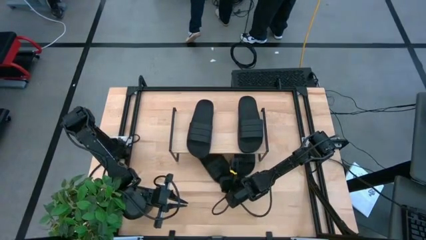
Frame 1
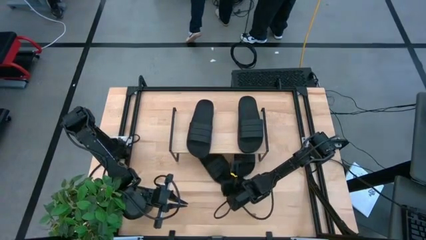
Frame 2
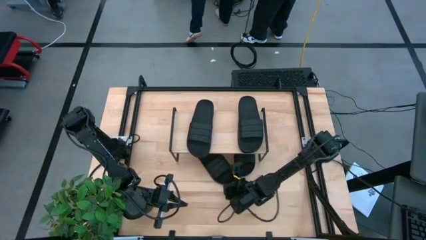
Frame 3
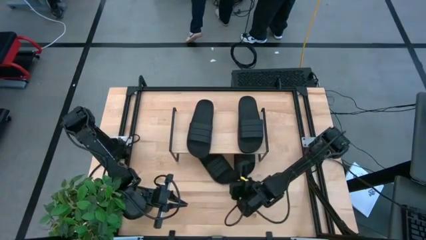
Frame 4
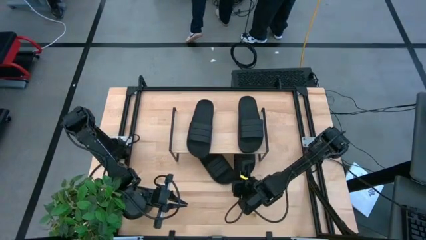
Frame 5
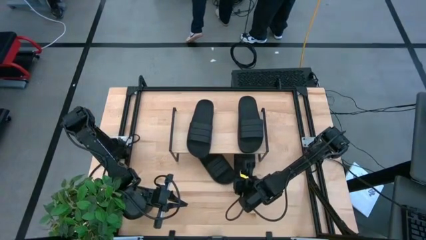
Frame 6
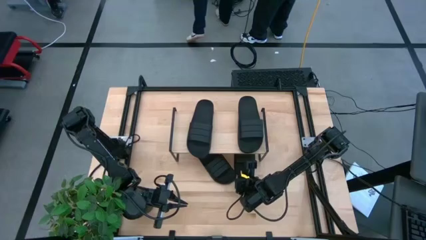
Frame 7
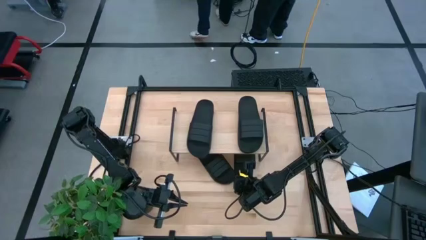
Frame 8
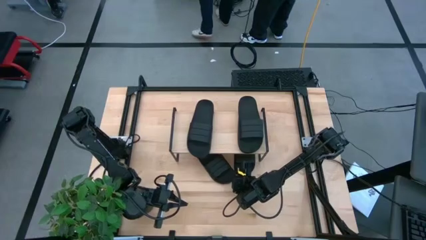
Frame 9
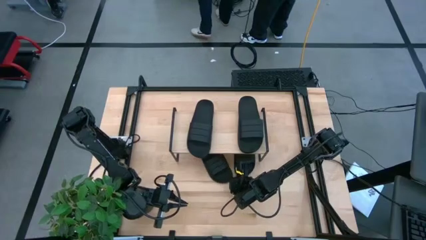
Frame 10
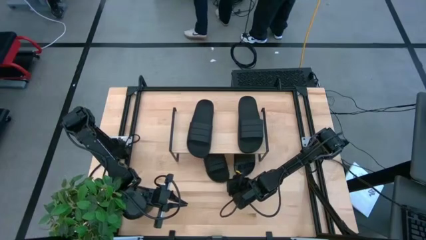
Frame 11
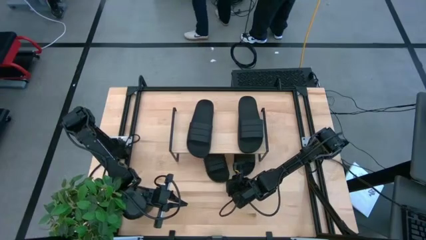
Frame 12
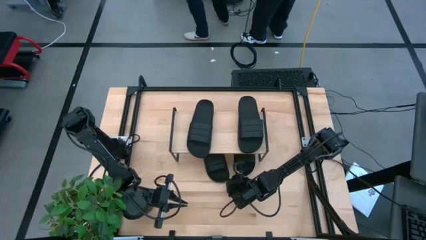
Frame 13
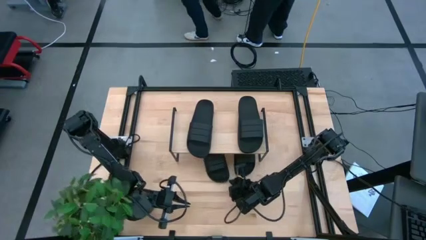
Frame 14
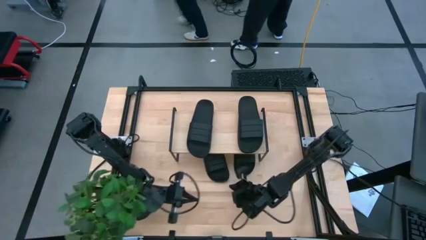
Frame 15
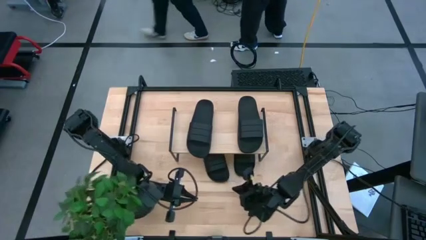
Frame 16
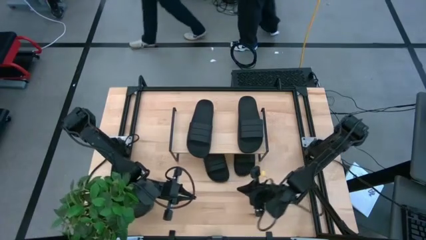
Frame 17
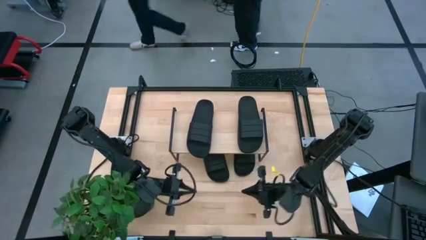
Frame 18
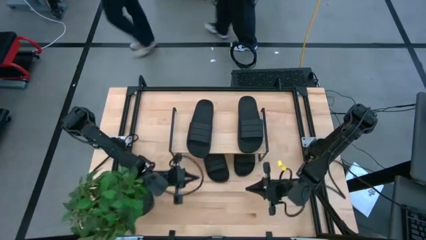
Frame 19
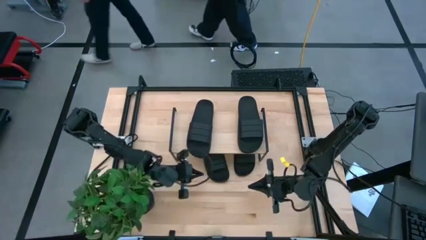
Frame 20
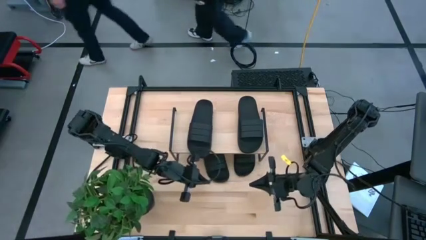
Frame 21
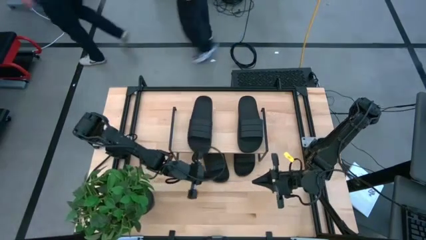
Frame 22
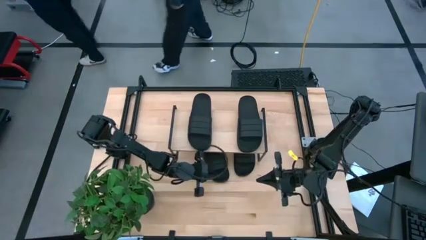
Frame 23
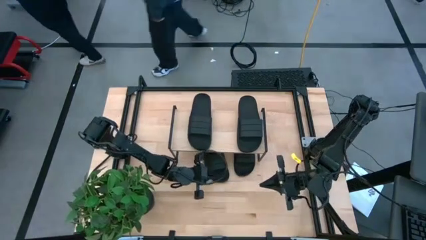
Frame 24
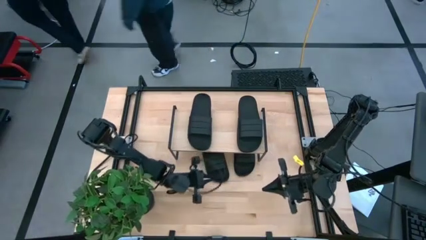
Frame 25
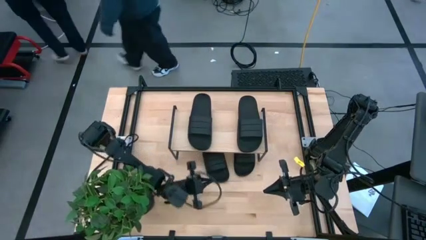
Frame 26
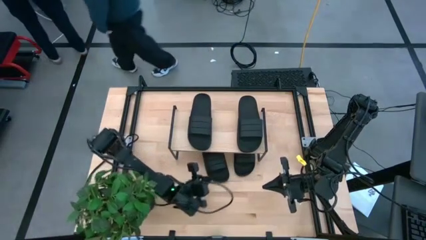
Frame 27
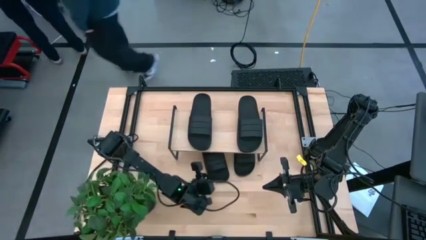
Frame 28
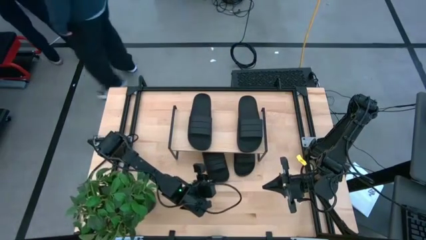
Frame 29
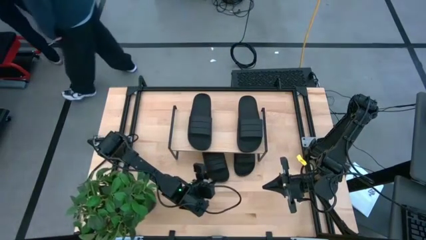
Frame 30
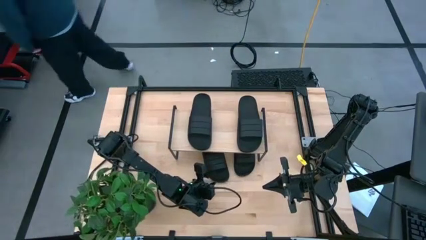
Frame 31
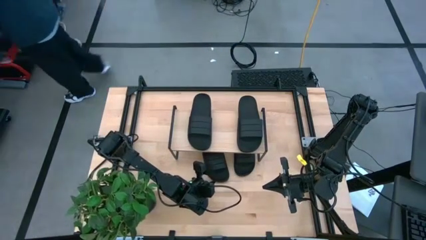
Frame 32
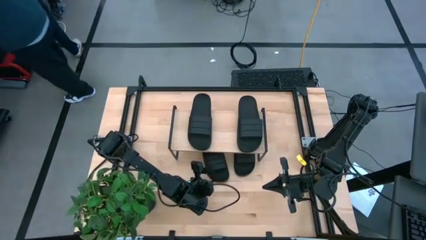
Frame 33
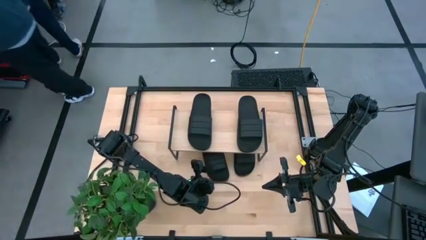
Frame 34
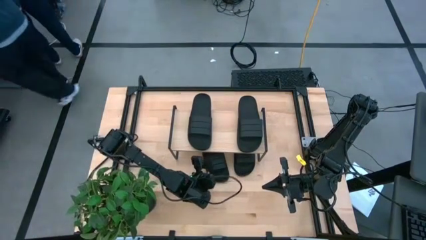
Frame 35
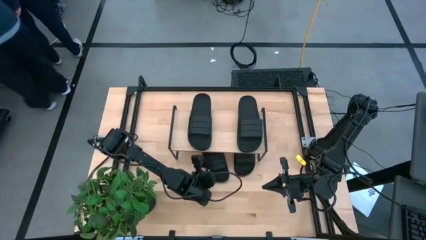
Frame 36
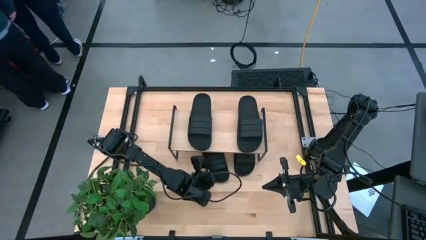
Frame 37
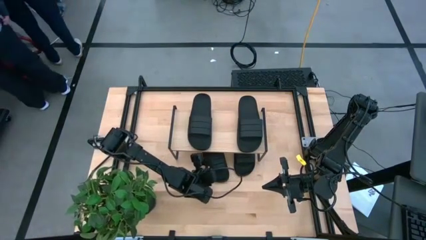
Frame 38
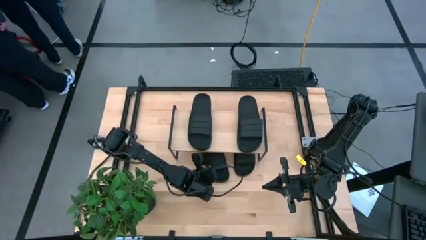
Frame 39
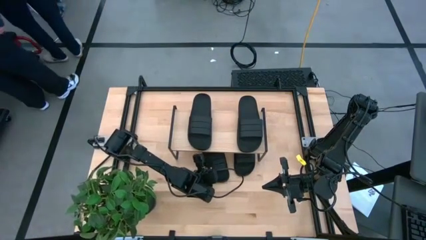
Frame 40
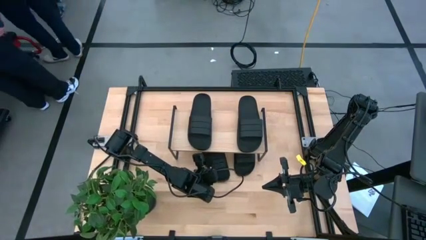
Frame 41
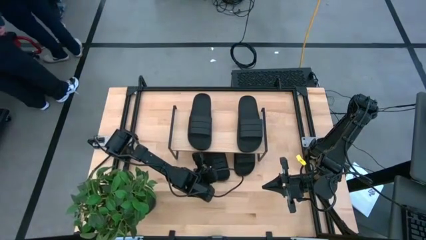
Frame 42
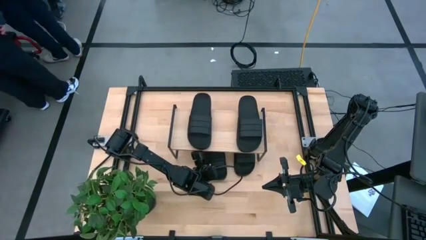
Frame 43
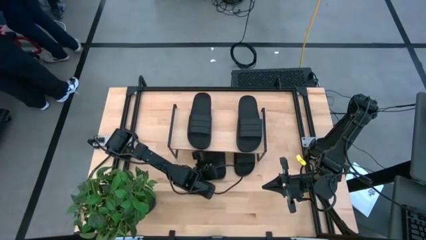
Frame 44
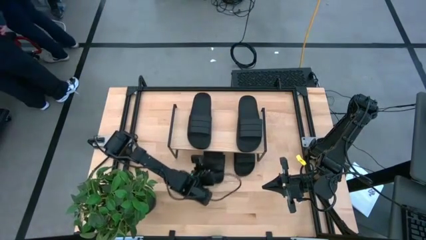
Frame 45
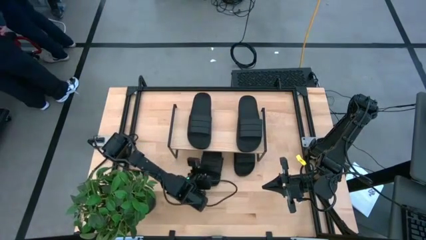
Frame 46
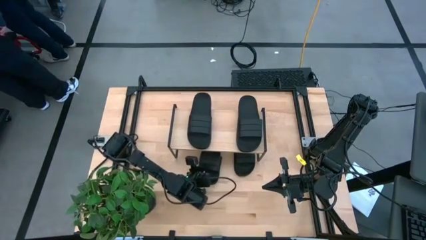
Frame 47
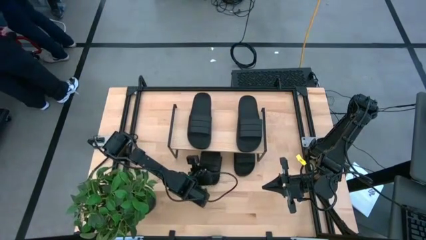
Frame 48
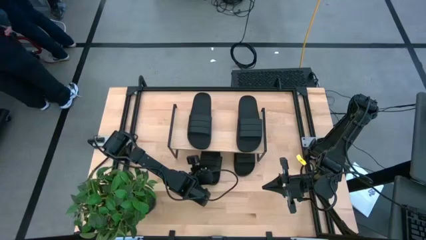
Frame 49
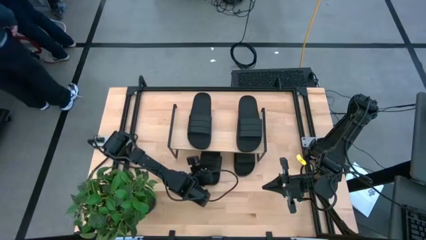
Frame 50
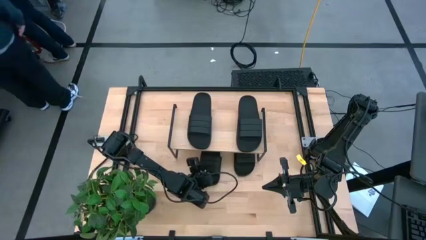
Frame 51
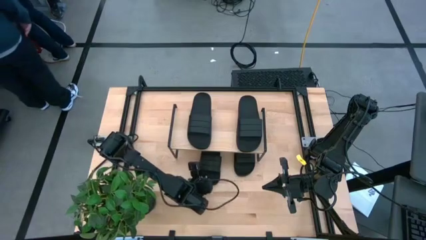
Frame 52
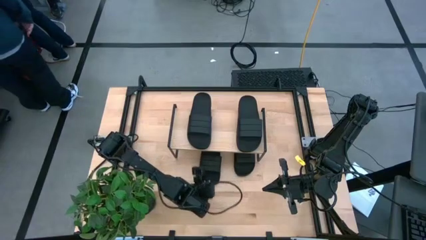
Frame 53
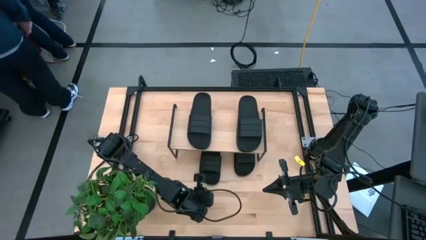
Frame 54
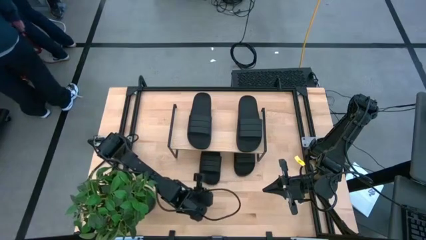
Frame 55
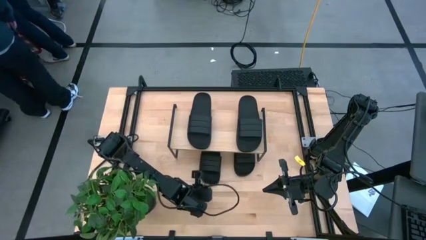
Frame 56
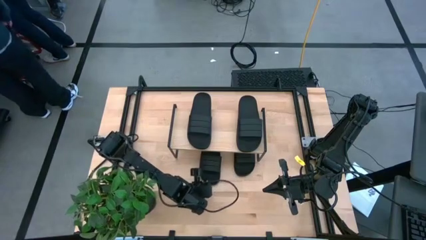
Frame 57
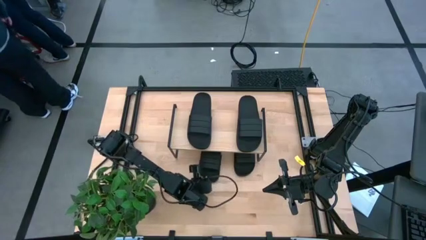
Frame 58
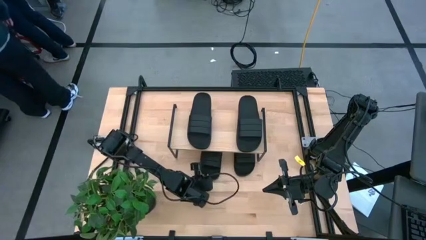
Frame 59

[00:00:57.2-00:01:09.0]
Task: Pick and place slides into the shelf
Put the slide under the shelf
